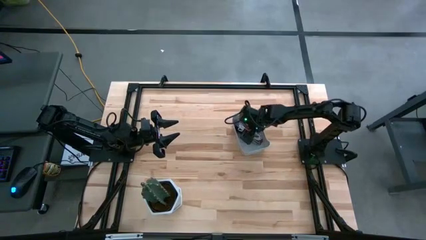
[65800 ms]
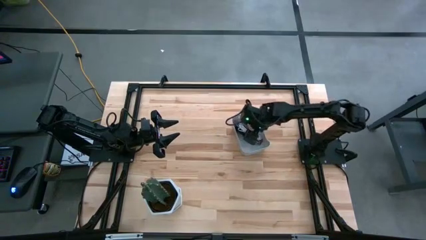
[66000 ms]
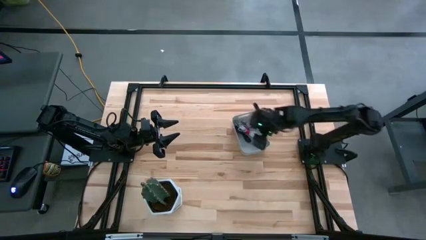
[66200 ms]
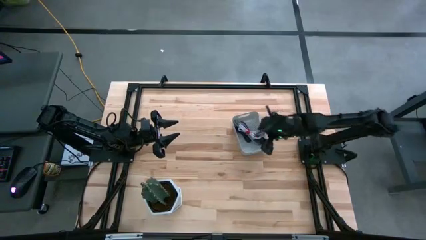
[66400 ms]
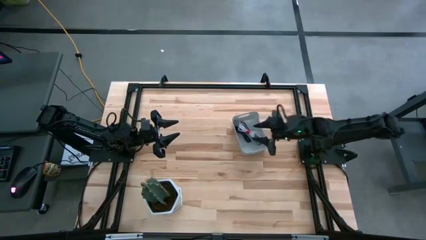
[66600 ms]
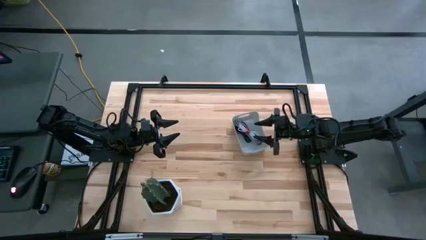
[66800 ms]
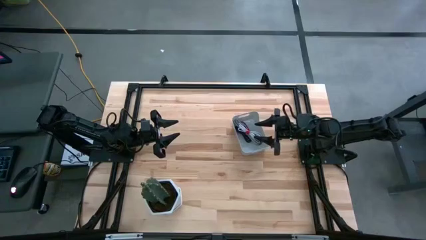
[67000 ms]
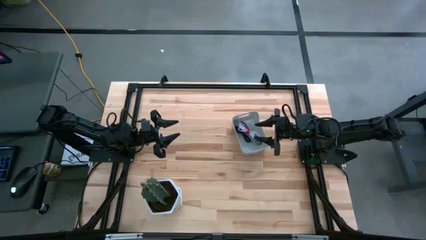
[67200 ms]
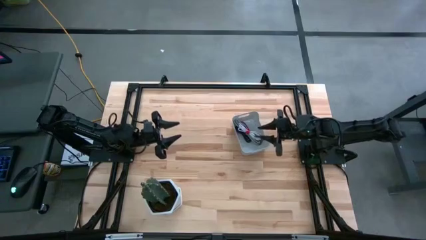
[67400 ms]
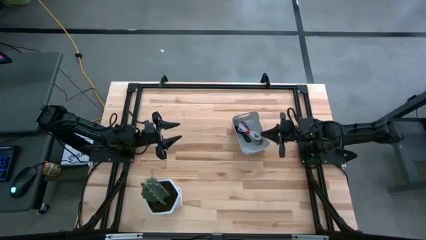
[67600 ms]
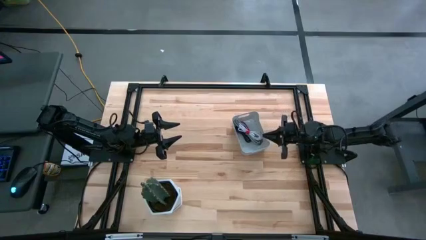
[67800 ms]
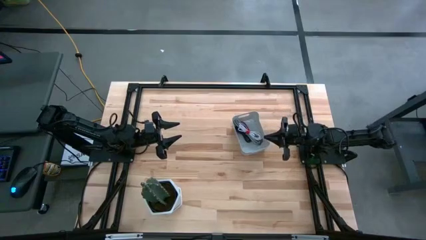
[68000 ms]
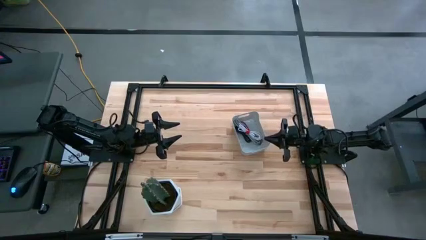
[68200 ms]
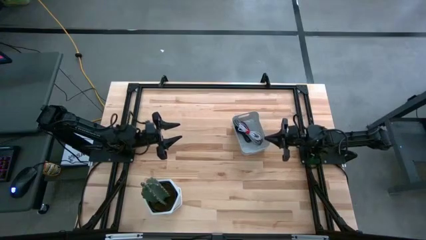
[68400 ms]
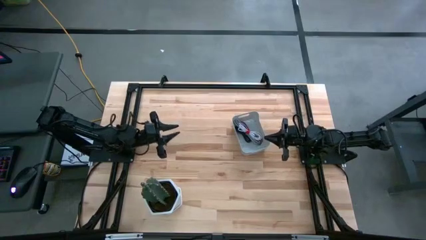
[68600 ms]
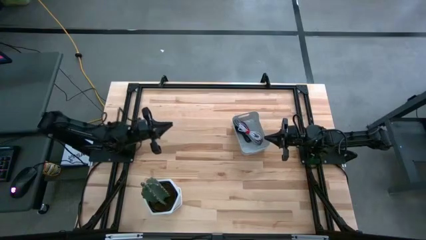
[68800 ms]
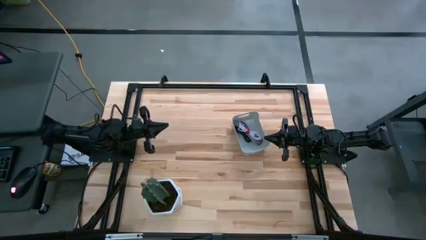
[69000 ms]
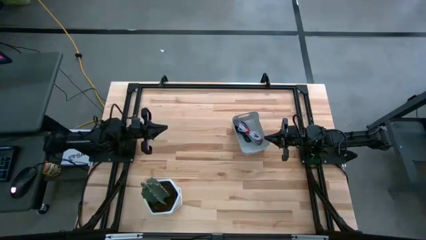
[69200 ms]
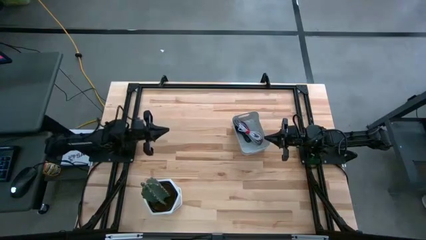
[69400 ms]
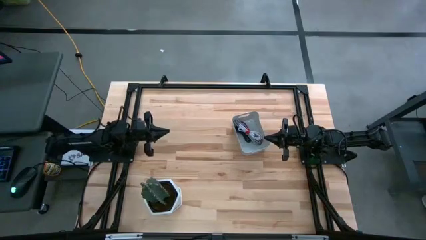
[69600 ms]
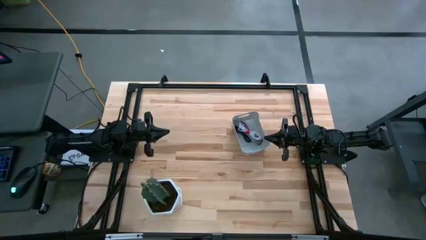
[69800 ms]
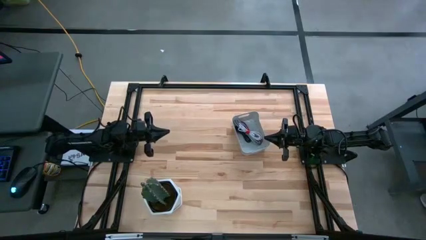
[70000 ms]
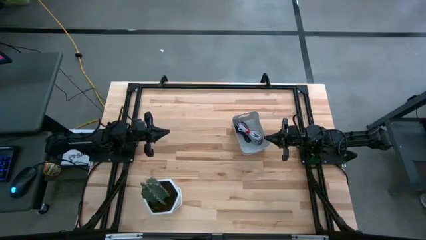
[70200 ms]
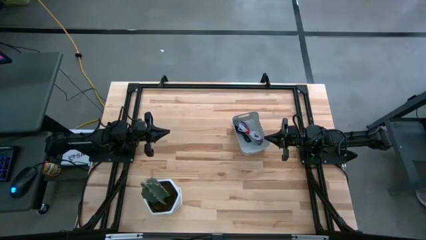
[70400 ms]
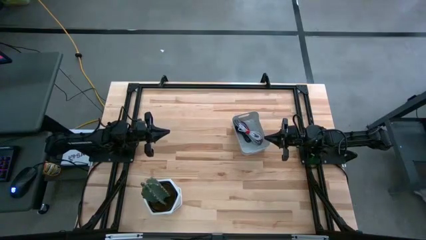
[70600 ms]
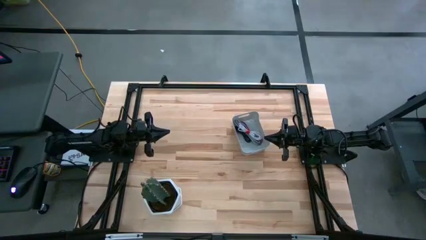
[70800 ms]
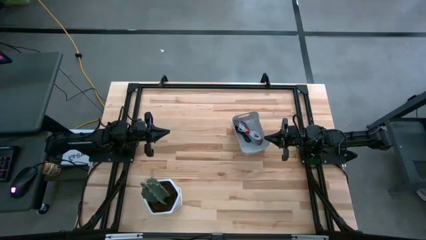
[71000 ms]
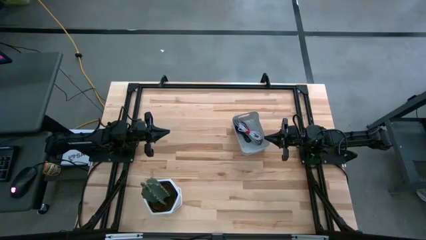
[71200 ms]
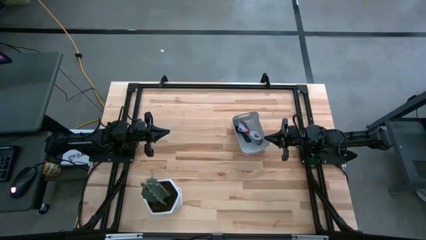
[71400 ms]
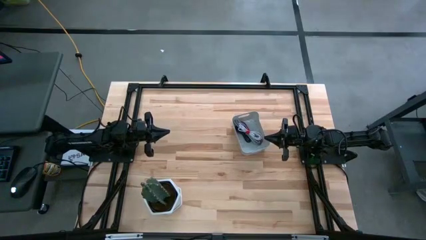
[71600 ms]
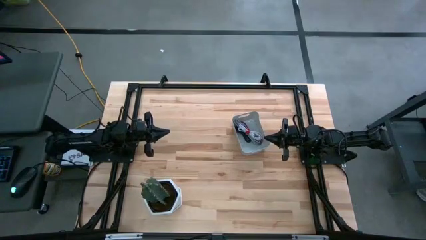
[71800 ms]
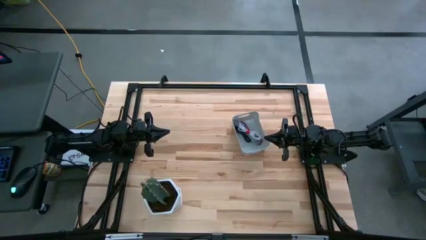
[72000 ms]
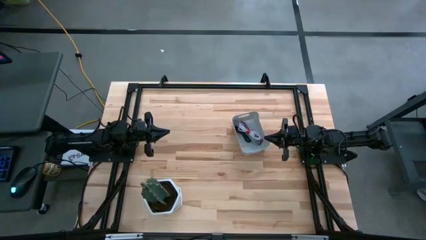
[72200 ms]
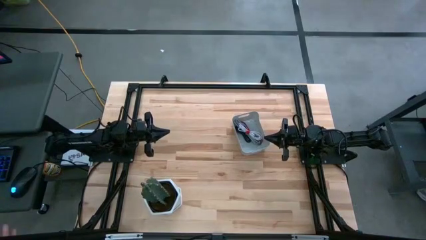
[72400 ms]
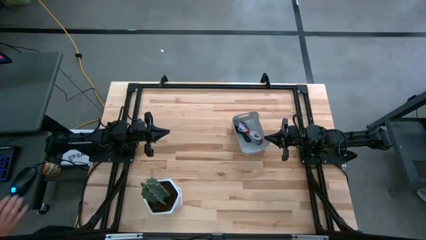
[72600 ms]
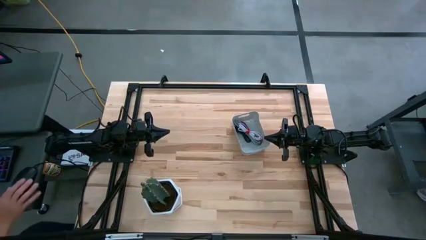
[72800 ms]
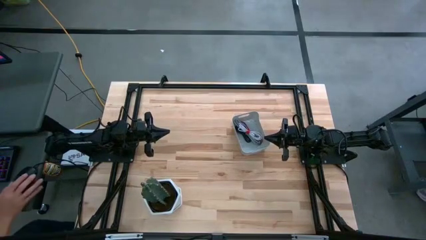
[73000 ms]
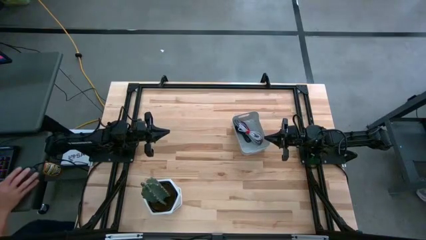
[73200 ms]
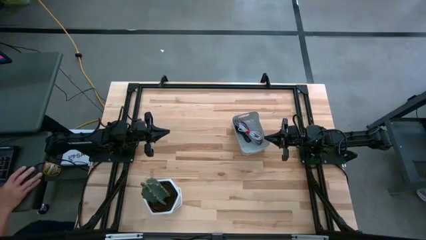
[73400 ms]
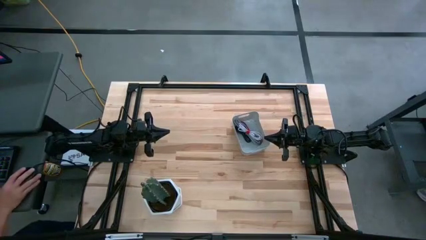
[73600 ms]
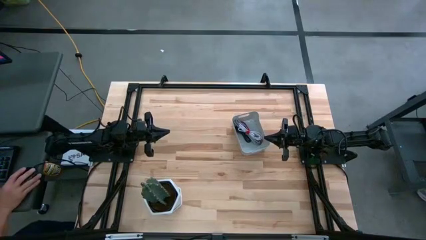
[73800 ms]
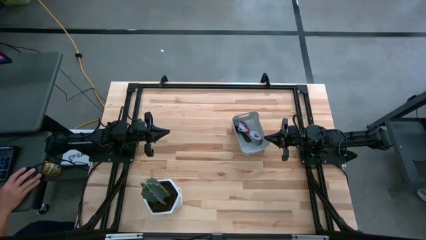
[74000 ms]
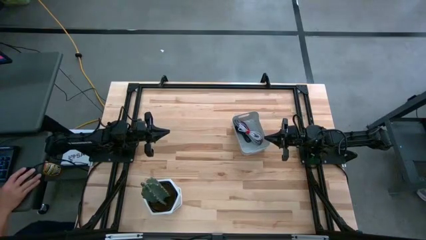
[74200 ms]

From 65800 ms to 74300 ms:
Task: Pick and place USB-C Cables
Return to Home Position

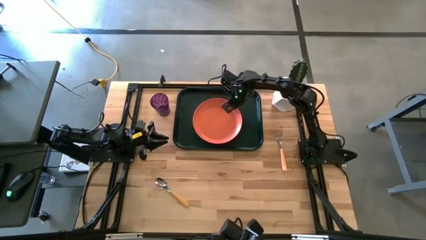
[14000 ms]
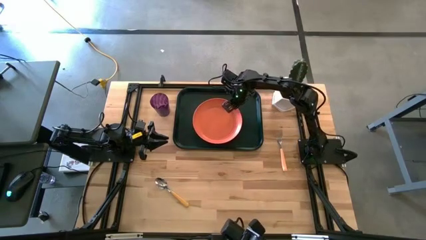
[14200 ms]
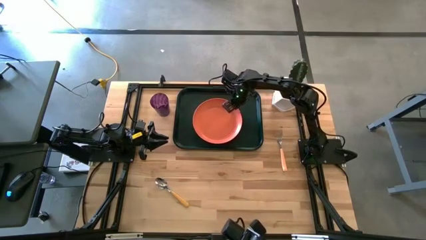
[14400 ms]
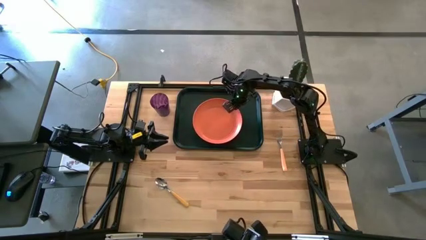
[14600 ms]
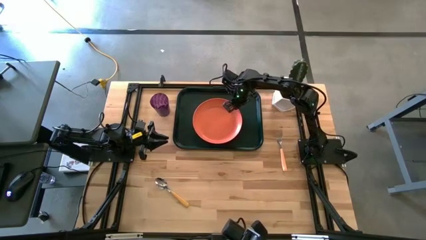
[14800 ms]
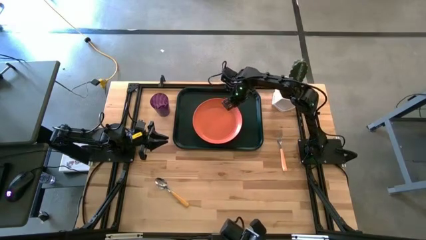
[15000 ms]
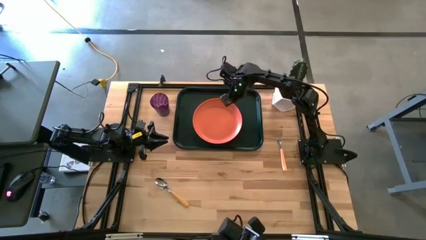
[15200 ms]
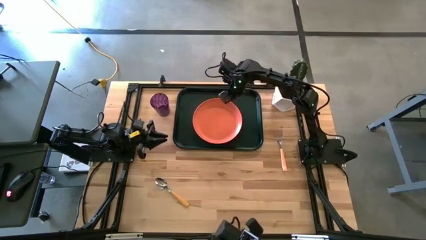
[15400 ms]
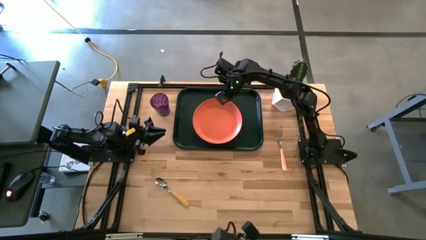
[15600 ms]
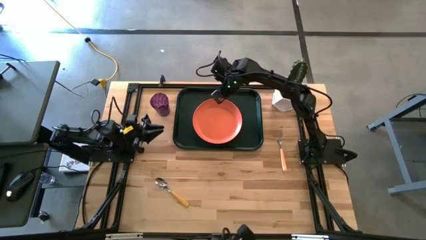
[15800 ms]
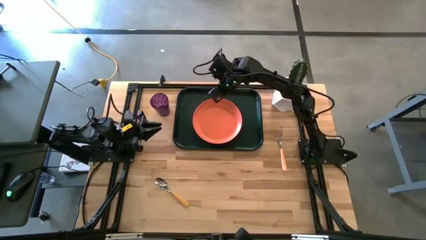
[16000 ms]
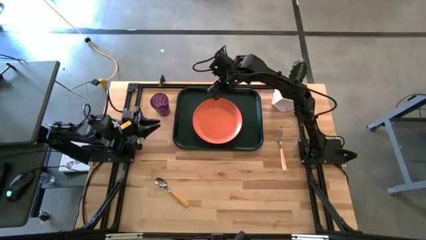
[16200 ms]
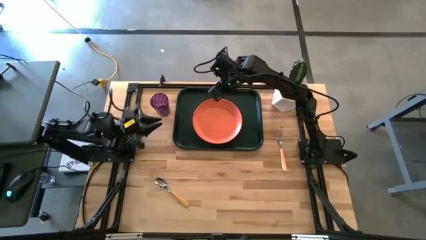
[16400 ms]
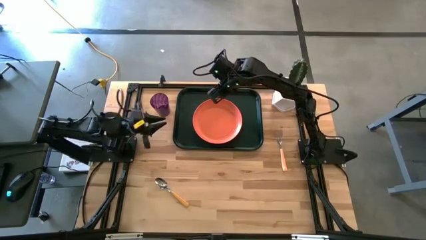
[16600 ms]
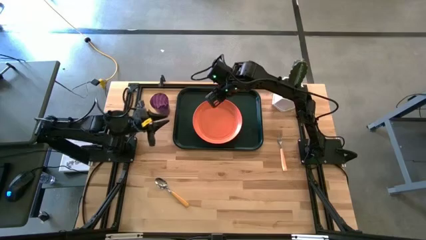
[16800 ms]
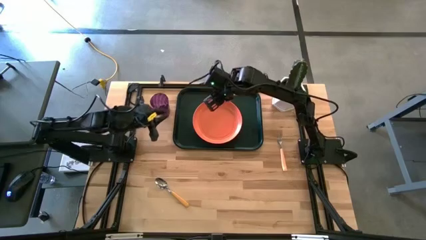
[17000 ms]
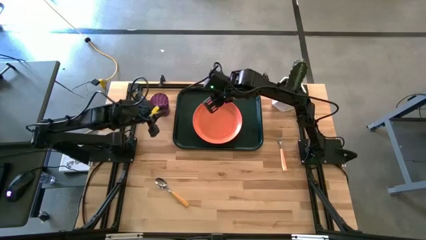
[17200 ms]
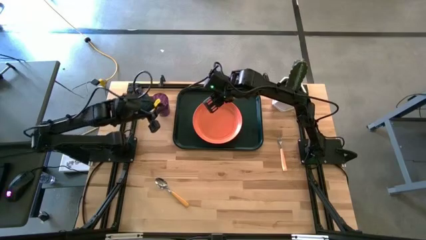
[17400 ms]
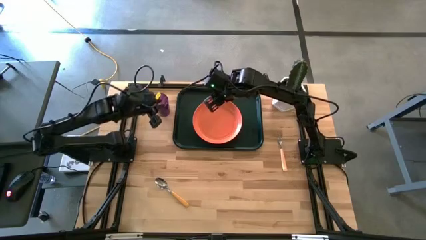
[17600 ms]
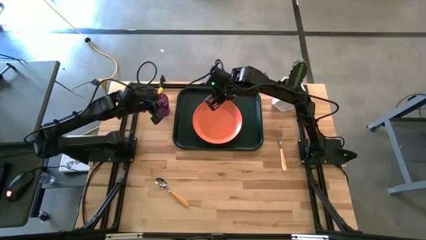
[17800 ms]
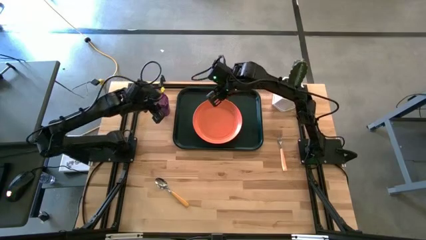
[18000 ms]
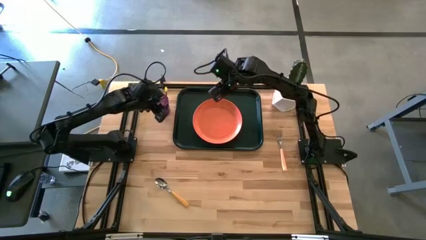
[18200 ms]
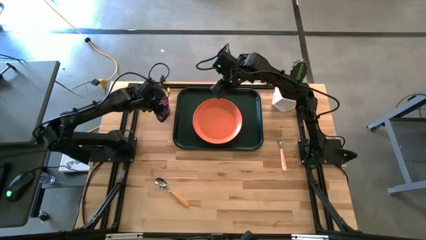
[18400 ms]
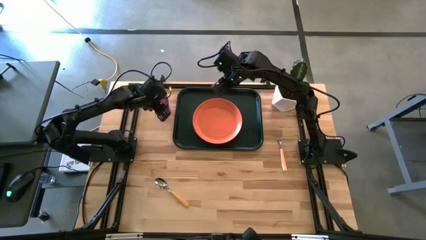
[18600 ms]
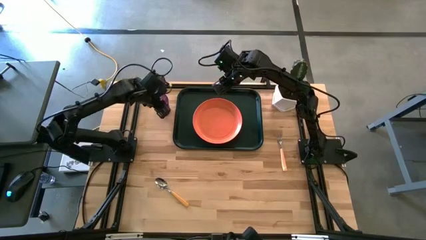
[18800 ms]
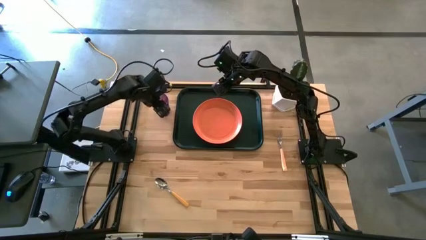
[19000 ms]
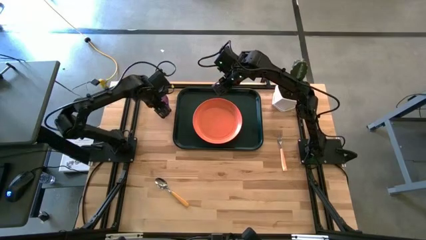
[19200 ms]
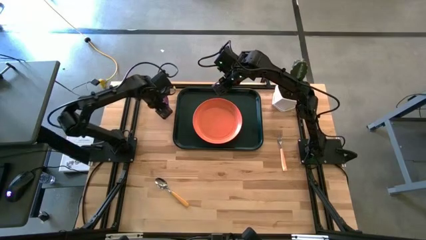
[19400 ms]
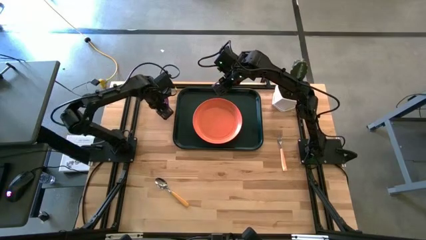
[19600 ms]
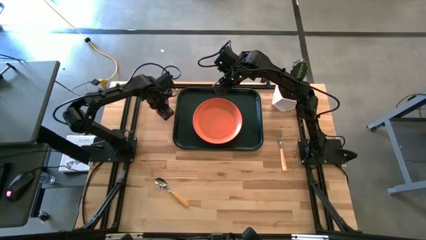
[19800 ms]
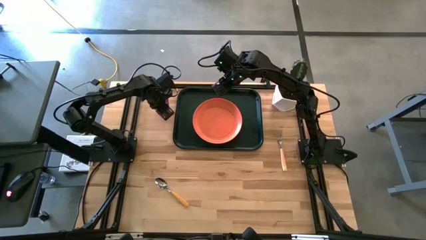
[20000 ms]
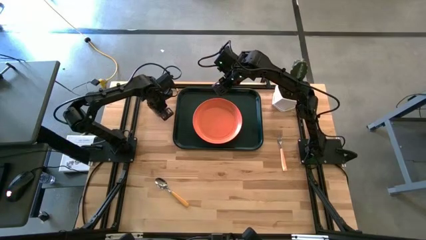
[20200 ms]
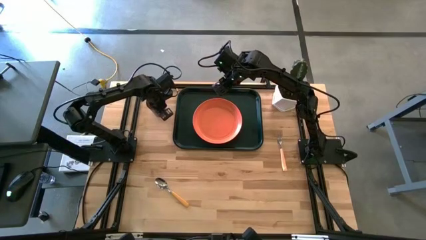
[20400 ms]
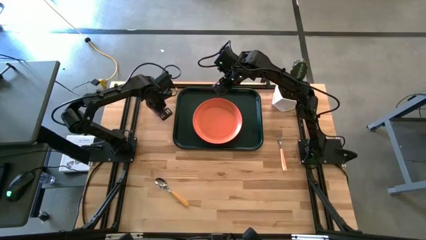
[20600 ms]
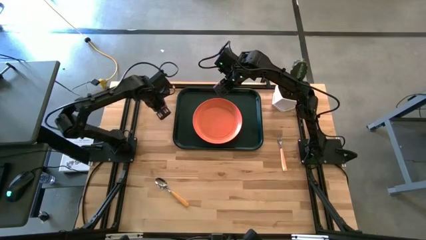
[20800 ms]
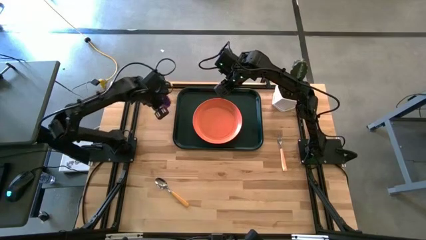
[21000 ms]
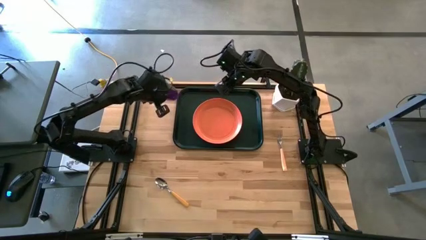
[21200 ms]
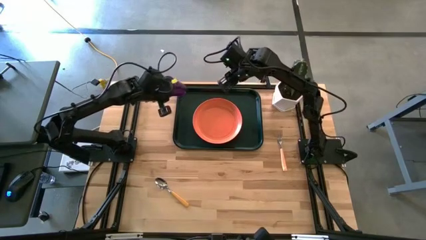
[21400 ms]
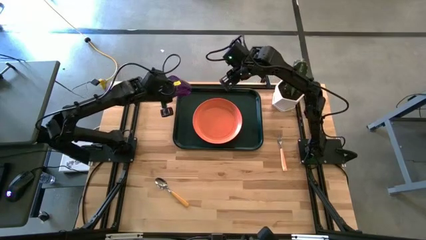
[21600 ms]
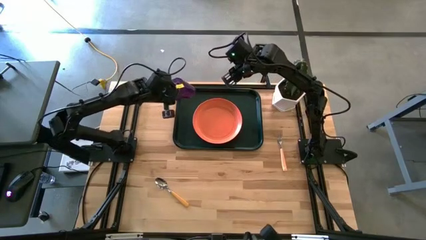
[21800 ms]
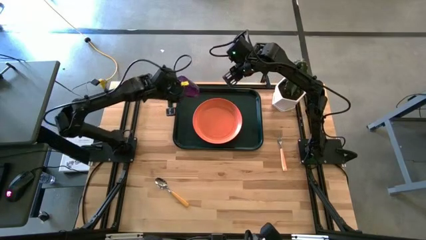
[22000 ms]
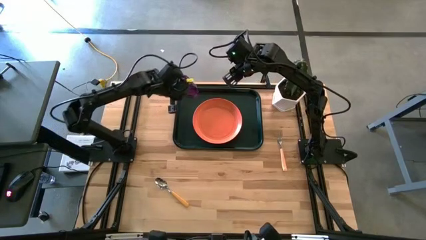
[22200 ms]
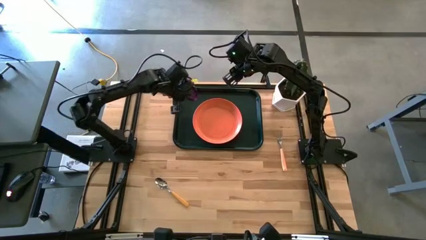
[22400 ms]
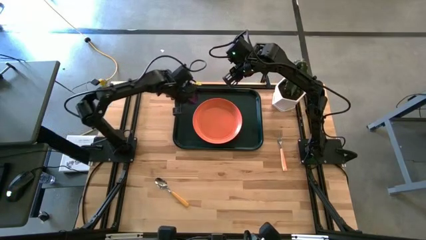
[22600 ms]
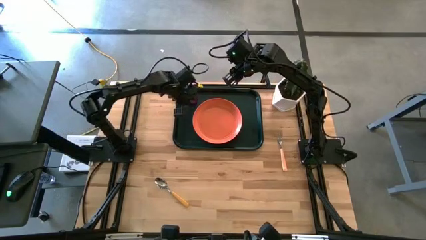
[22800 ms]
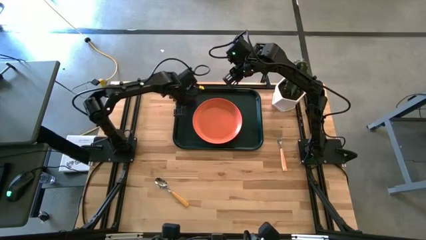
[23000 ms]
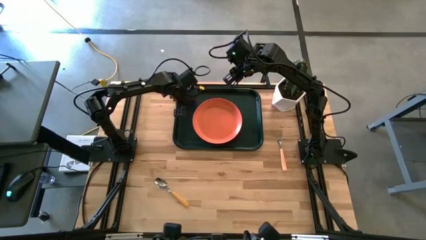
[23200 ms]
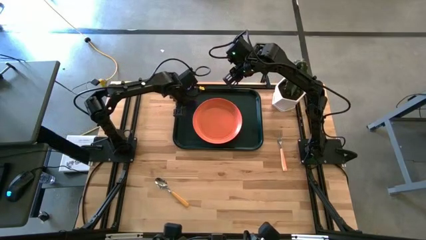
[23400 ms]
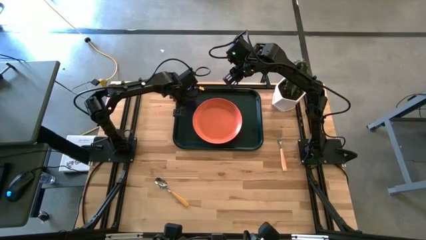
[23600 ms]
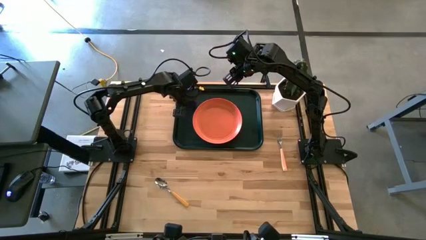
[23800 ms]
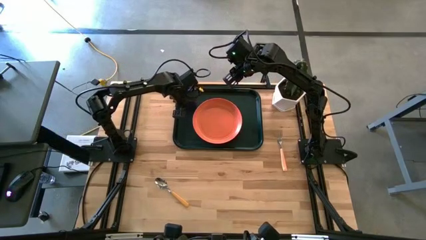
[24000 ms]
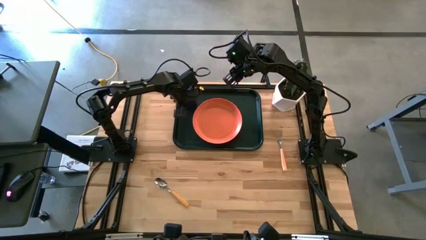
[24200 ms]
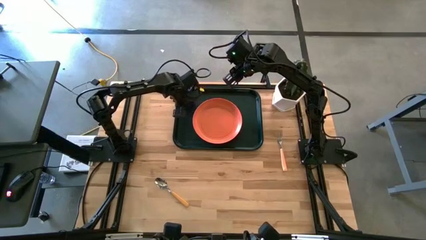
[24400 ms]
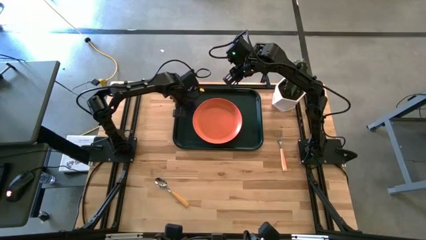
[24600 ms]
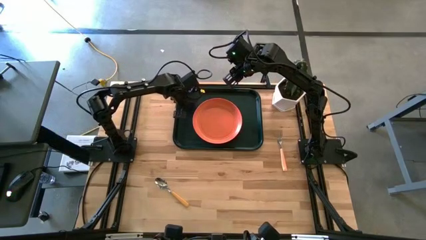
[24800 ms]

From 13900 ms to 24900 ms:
Task: Pick and place plate/cup/fork/spoon on tray
Put the purple glass on the black serving tray to the top left of the orange plate
